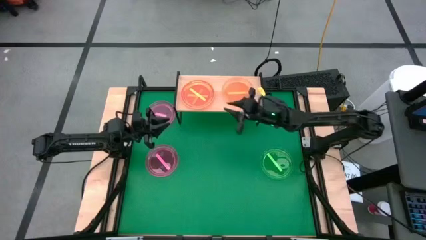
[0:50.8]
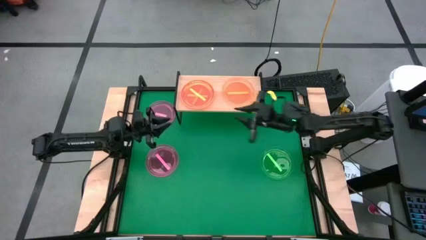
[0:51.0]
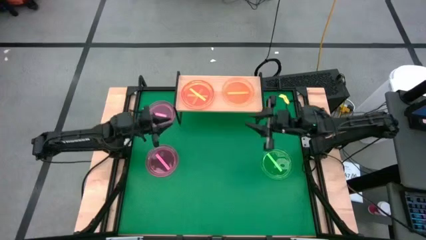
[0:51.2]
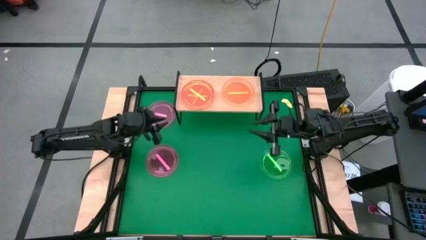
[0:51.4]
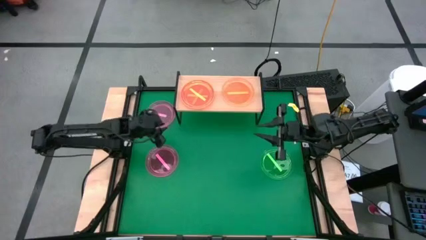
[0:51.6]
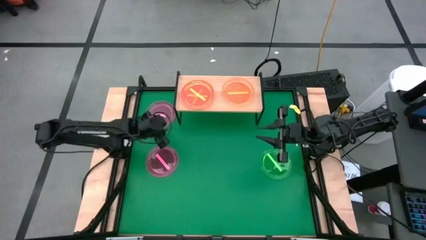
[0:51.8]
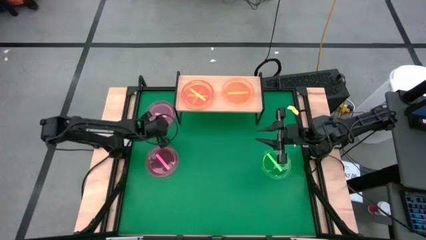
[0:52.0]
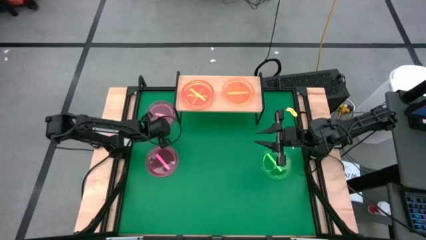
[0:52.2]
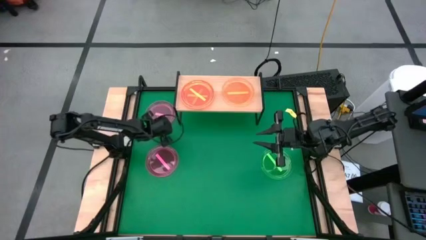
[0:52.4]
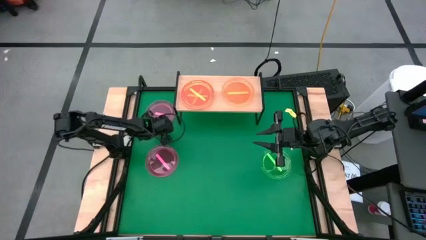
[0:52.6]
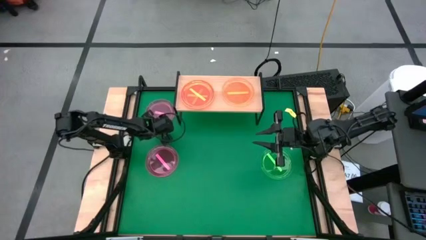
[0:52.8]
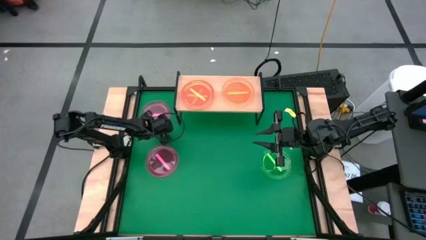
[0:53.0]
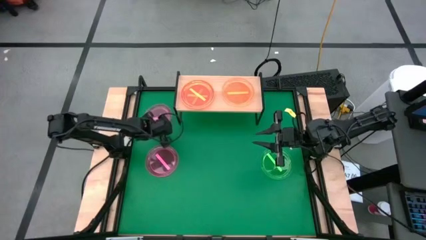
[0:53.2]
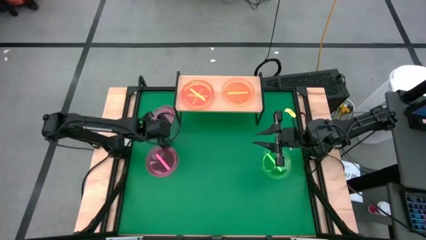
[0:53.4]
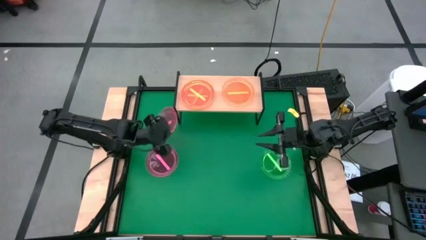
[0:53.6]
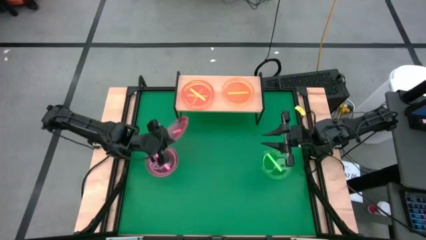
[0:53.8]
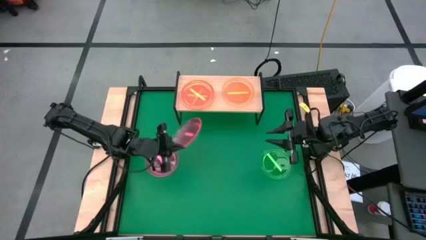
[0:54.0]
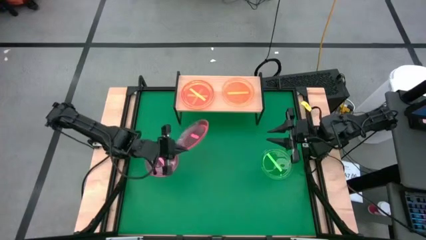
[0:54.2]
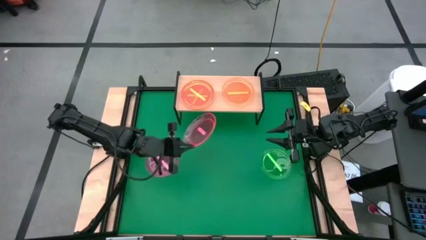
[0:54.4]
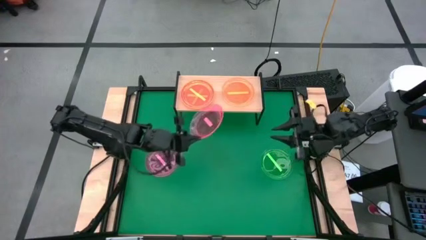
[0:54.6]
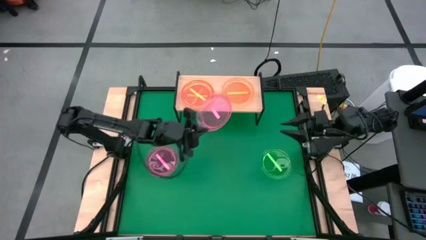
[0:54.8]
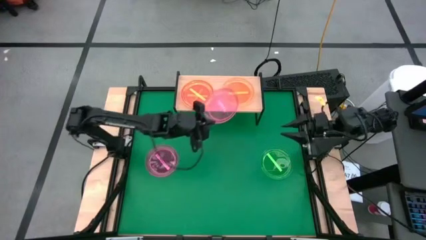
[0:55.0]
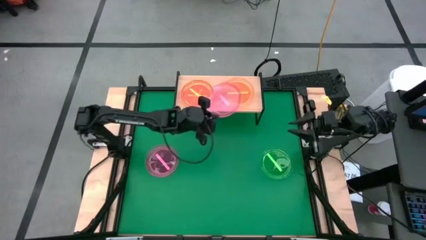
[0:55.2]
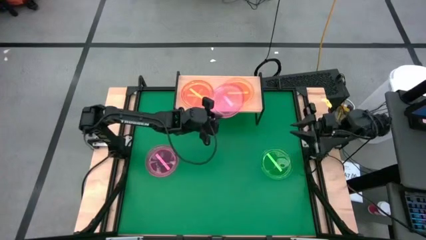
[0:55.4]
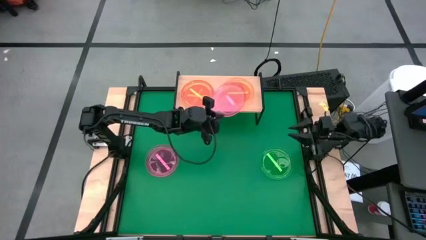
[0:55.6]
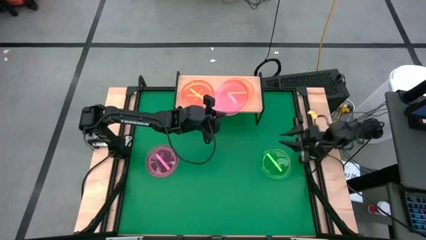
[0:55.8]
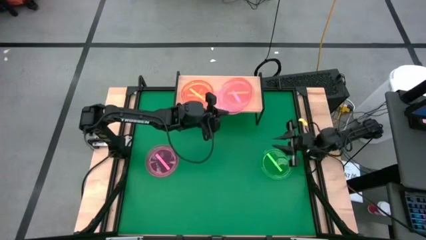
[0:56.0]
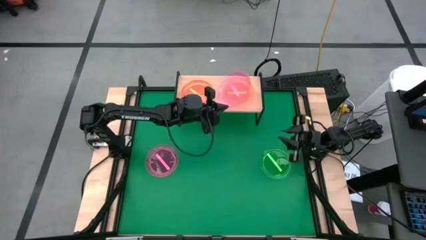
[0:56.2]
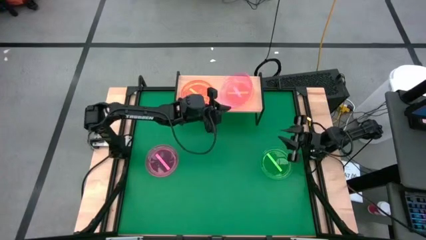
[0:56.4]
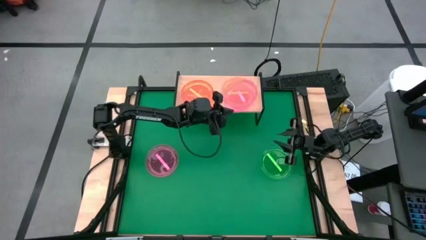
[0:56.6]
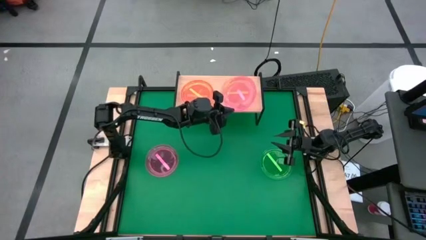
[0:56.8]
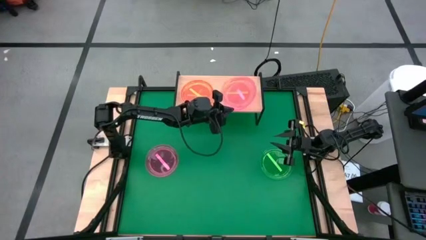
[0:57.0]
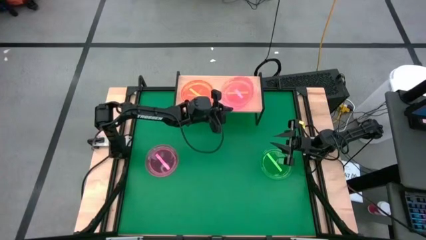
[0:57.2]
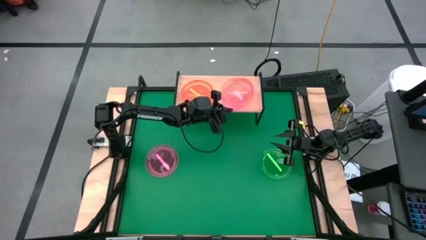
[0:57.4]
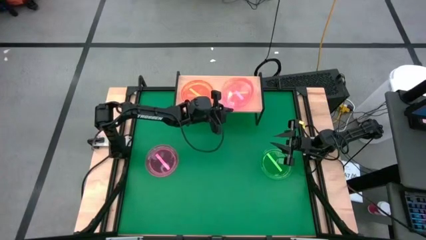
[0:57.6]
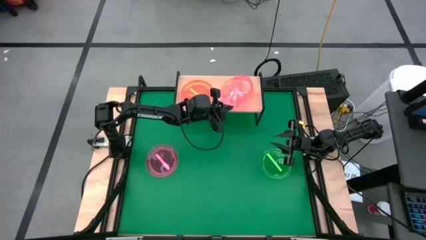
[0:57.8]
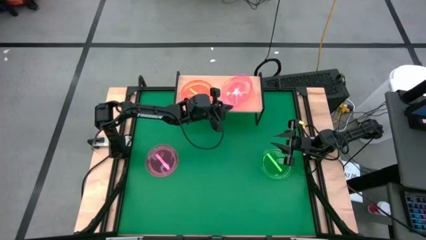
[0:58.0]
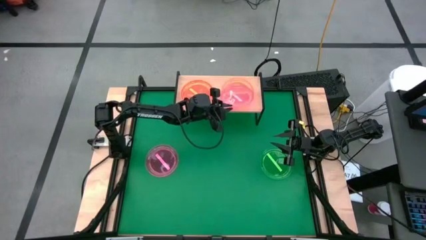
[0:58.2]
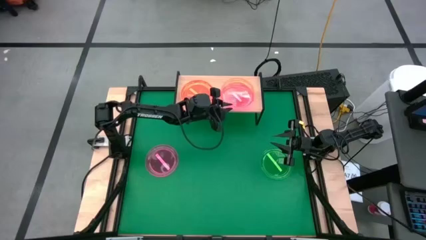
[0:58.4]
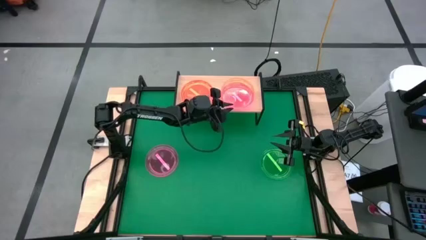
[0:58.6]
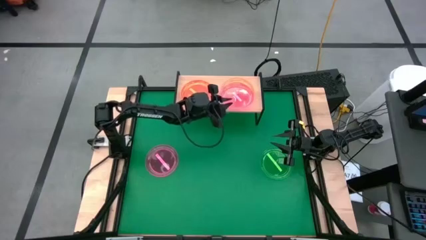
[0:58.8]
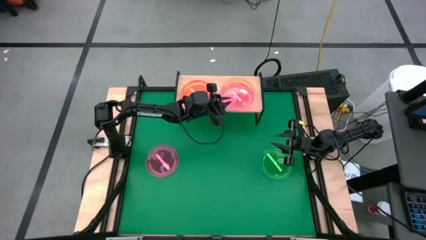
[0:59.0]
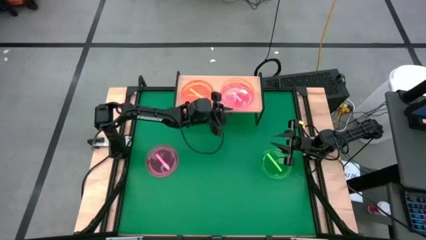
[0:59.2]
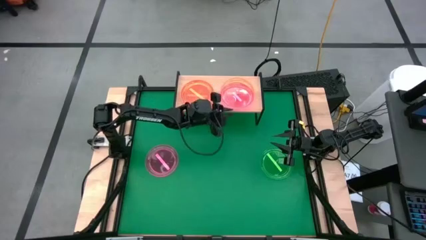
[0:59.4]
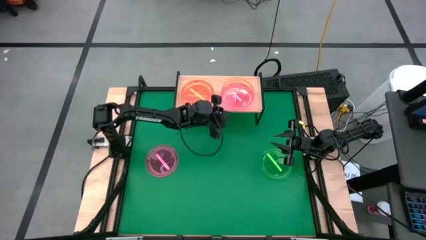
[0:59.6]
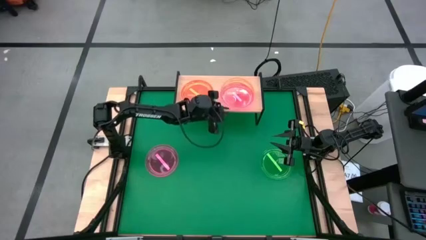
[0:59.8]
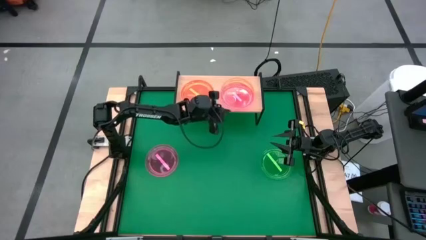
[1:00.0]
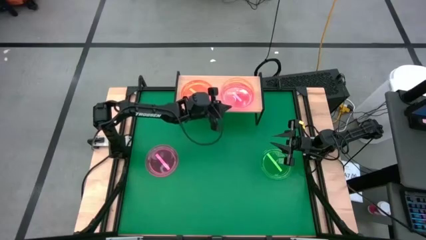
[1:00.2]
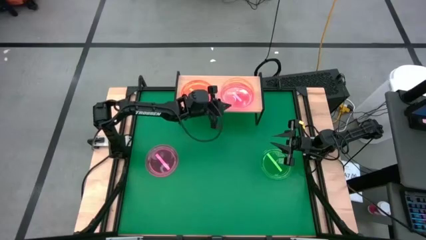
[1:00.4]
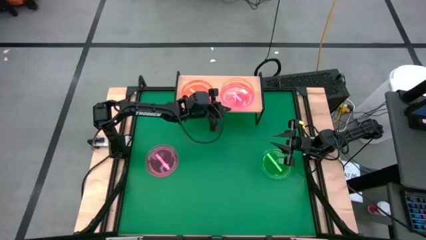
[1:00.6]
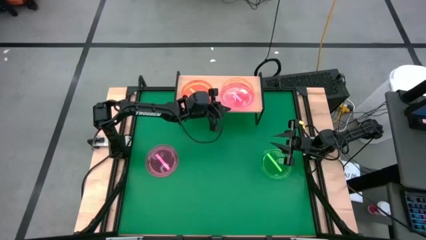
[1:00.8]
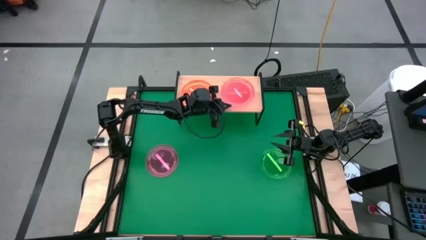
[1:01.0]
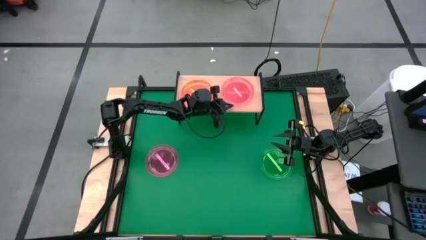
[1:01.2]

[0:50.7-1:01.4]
Task: Place and stack plates onto a shelf
Stack the top pink plate on the orange plate on the shelf

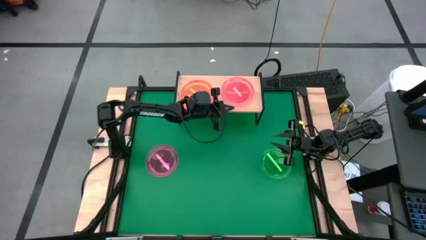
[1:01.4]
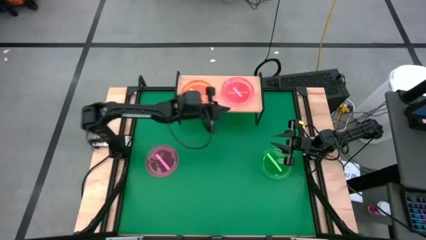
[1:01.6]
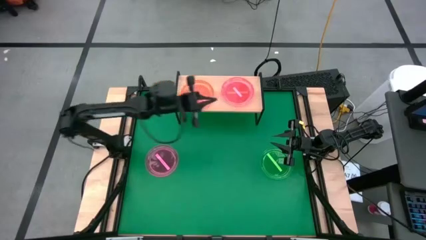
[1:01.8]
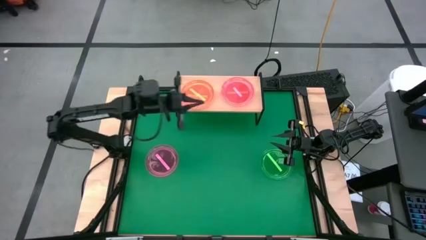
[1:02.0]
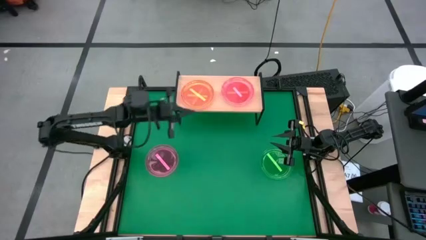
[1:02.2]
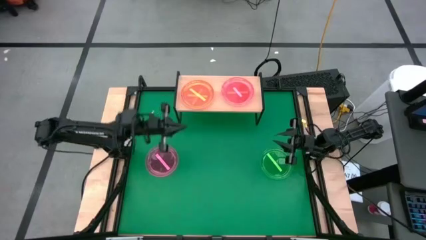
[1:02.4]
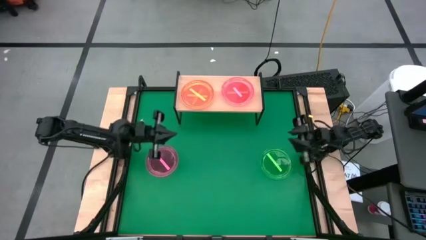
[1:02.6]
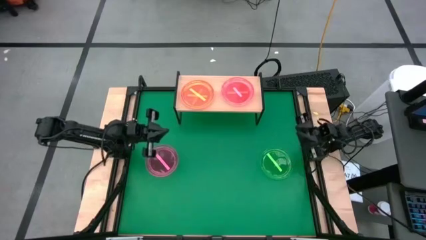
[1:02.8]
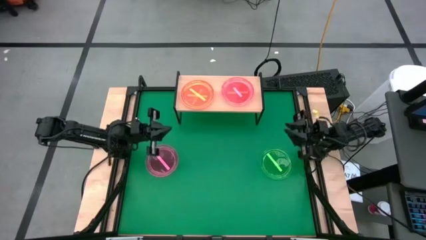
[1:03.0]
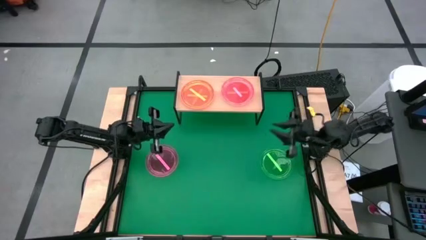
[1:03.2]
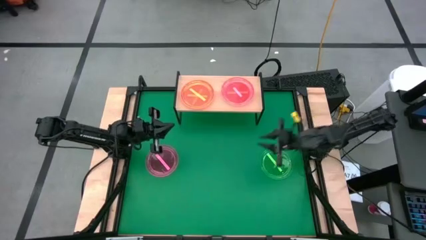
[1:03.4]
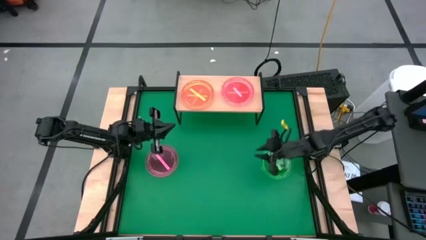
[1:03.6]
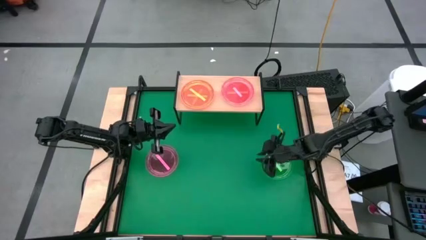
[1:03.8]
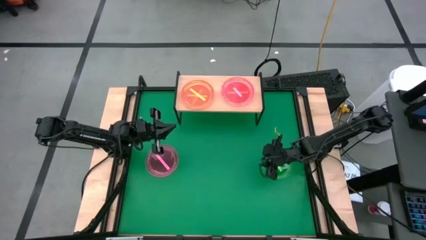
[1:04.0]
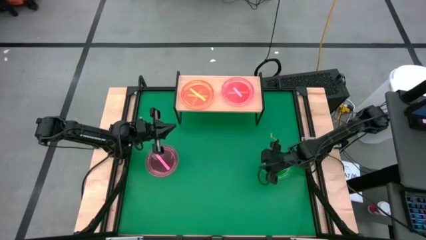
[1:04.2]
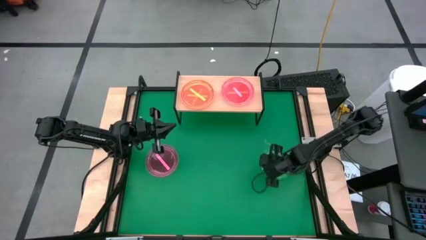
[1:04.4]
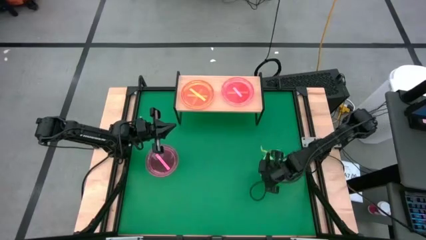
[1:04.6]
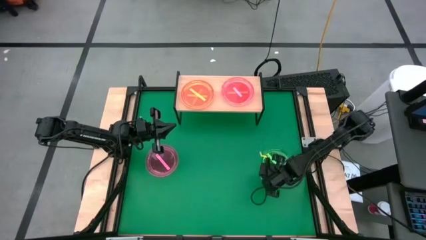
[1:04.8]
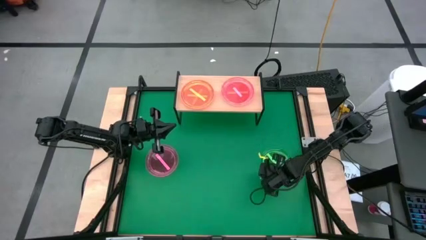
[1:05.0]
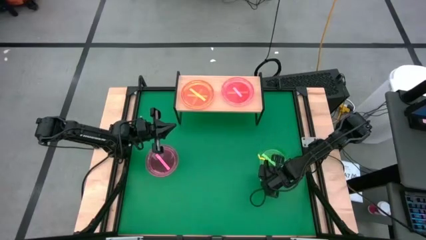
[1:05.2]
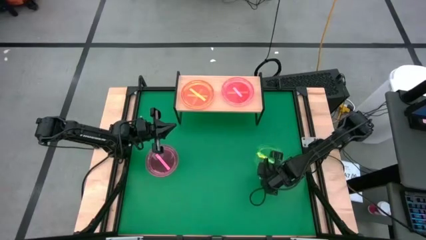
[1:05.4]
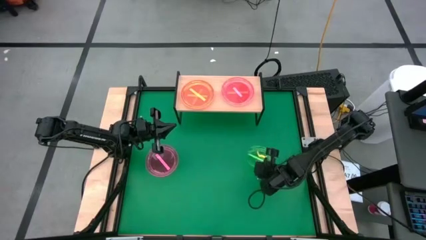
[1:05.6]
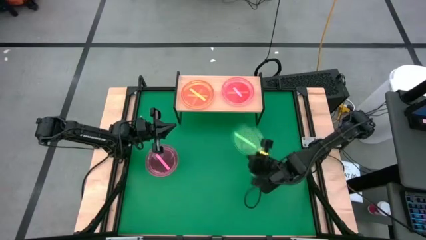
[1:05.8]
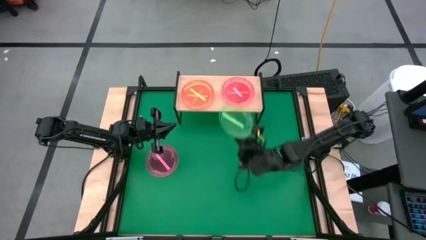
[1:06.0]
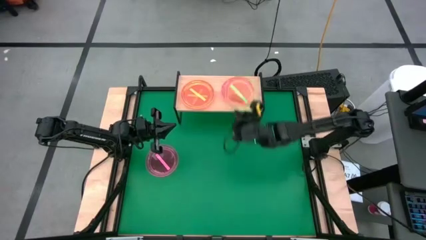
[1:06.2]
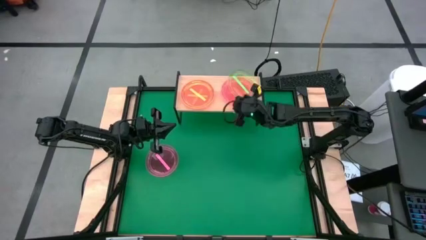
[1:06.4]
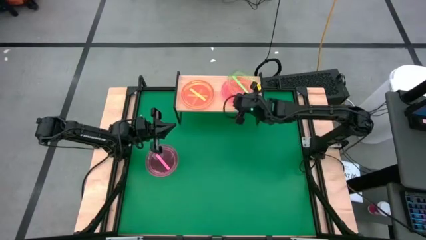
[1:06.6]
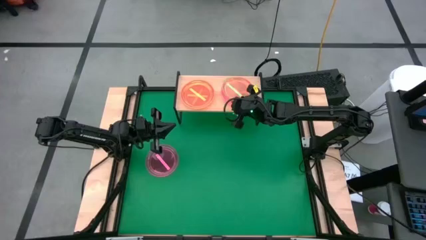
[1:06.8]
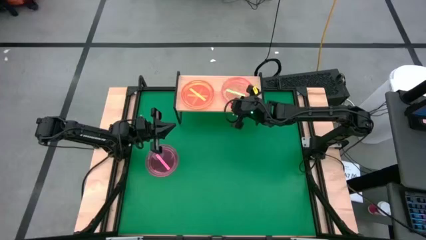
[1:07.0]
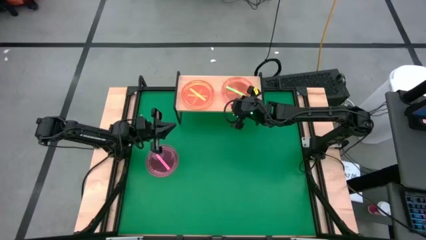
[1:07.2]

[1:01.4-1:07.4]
Stack the green plate on the pink plate on the shelf
